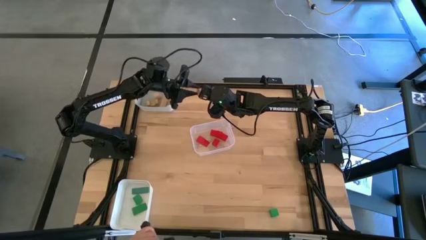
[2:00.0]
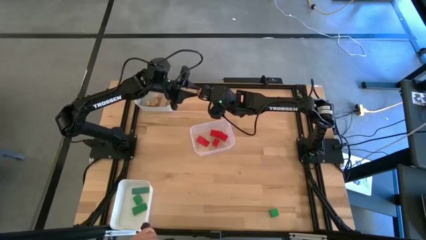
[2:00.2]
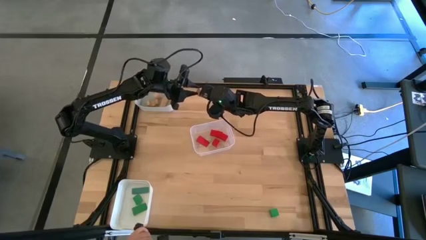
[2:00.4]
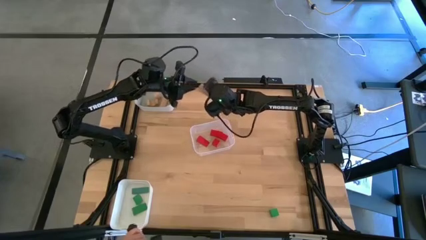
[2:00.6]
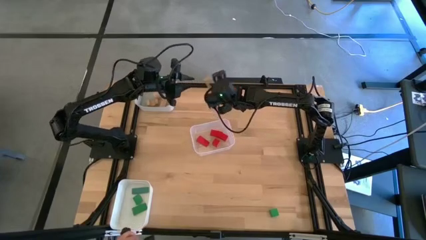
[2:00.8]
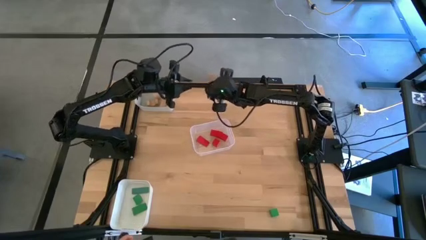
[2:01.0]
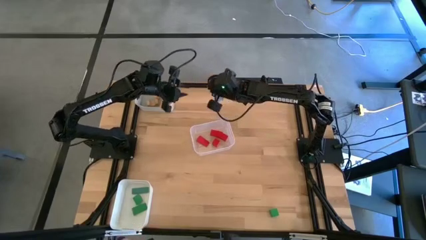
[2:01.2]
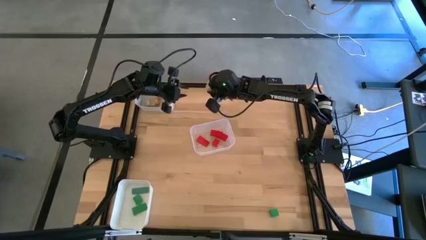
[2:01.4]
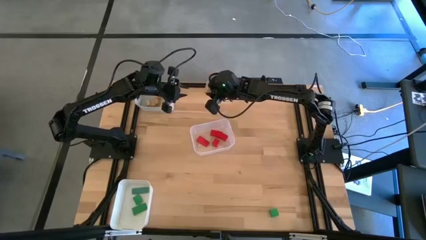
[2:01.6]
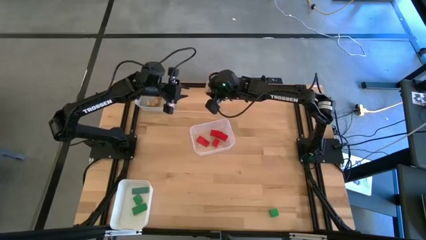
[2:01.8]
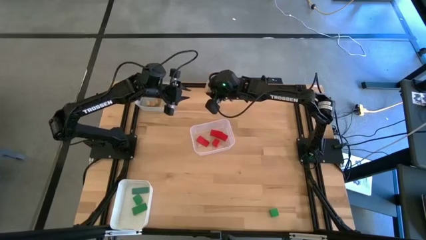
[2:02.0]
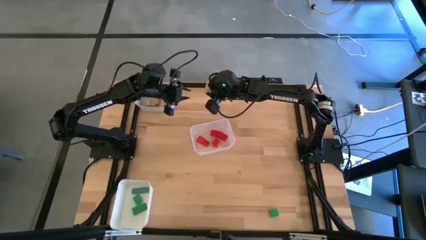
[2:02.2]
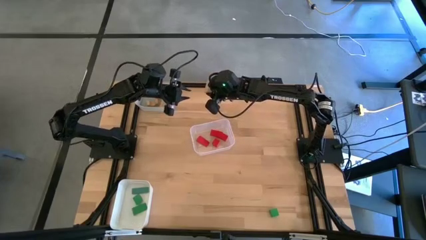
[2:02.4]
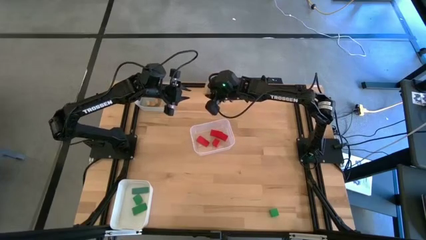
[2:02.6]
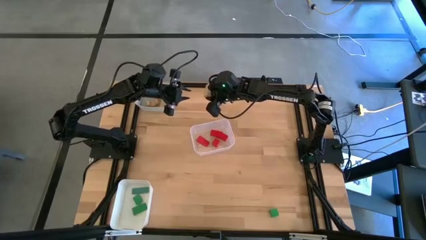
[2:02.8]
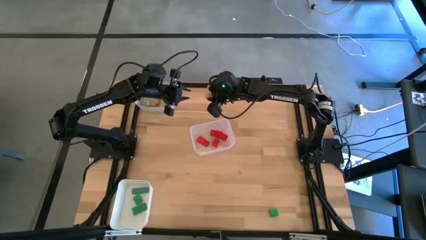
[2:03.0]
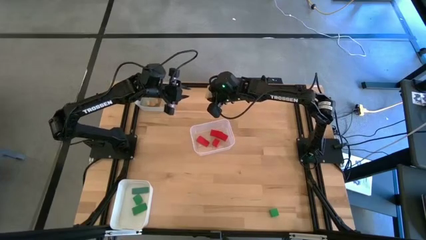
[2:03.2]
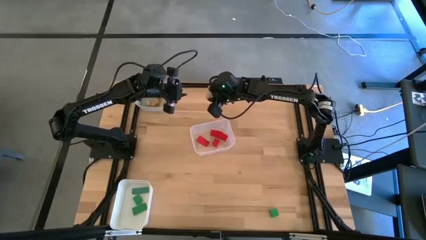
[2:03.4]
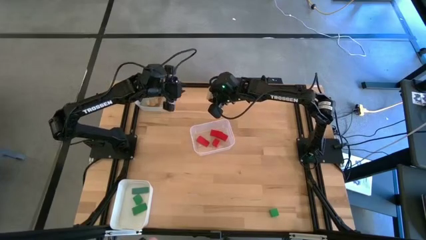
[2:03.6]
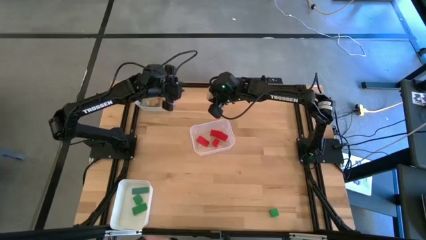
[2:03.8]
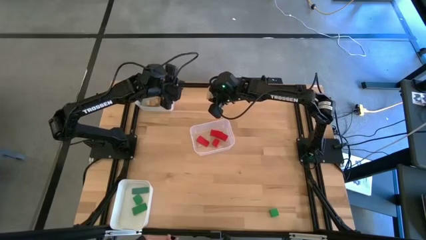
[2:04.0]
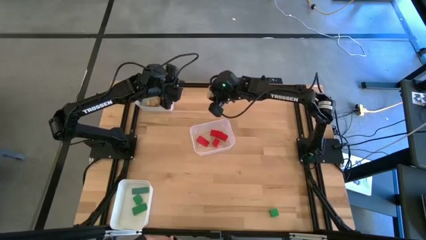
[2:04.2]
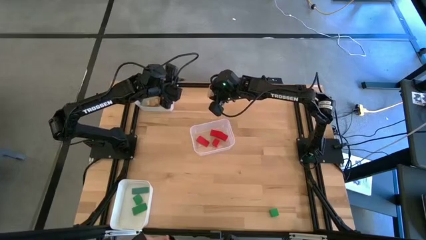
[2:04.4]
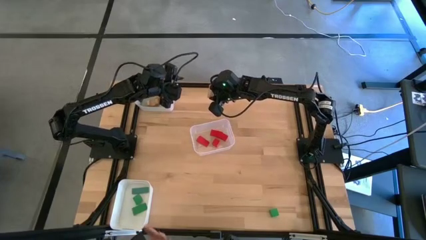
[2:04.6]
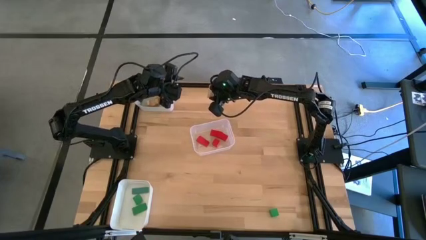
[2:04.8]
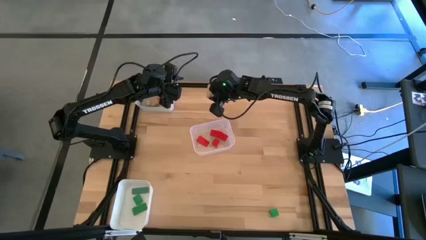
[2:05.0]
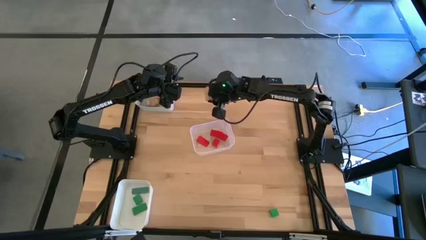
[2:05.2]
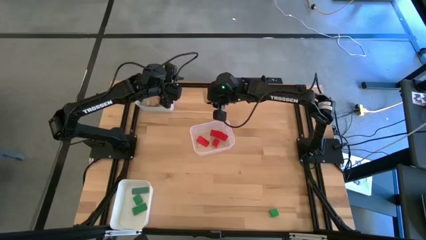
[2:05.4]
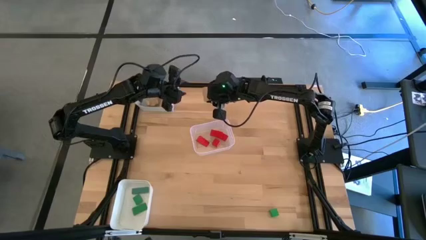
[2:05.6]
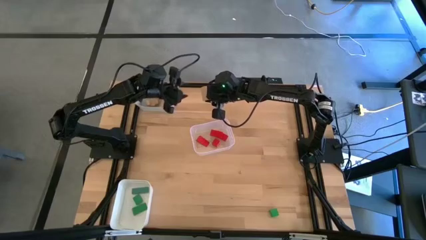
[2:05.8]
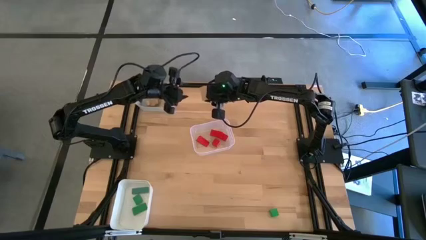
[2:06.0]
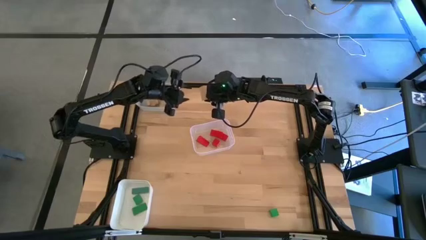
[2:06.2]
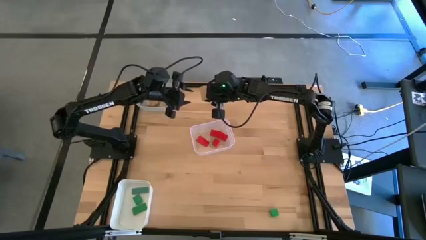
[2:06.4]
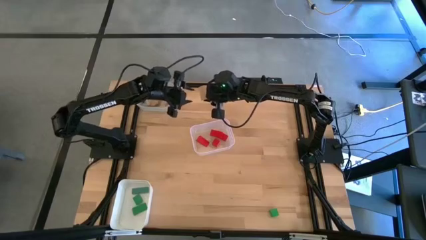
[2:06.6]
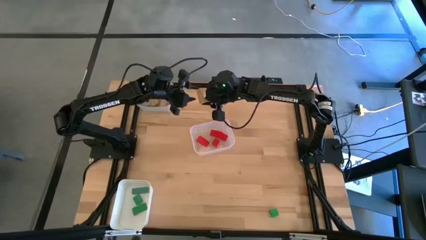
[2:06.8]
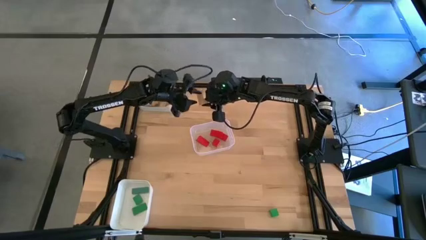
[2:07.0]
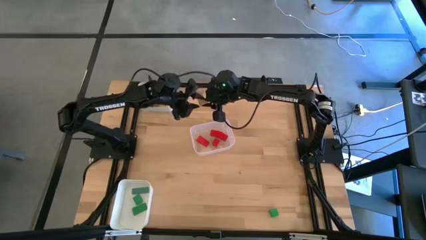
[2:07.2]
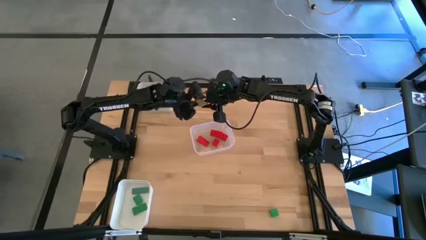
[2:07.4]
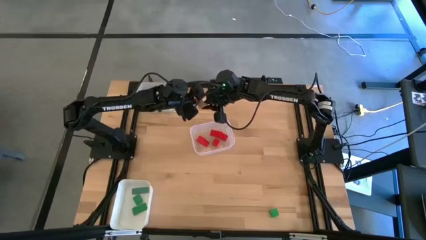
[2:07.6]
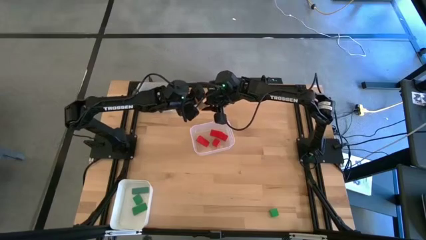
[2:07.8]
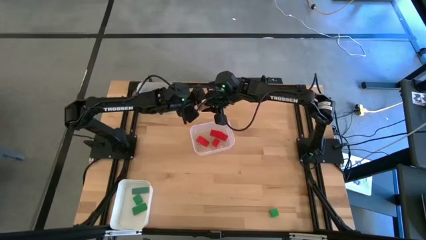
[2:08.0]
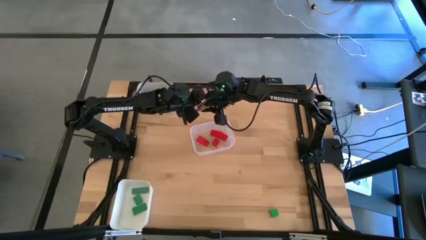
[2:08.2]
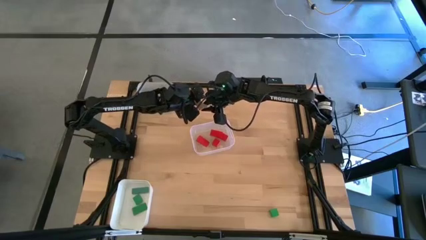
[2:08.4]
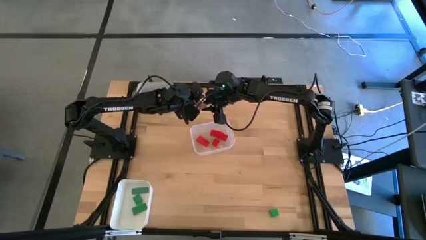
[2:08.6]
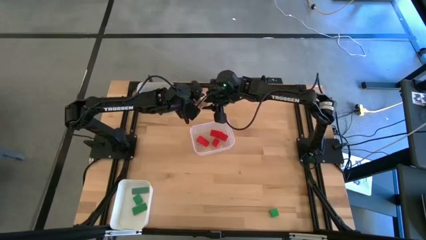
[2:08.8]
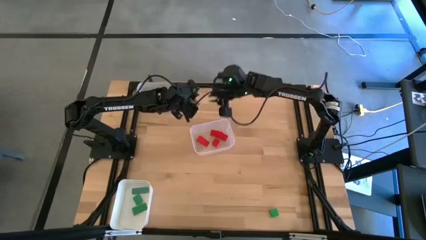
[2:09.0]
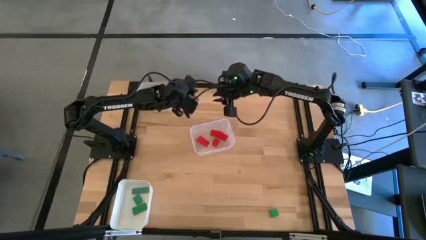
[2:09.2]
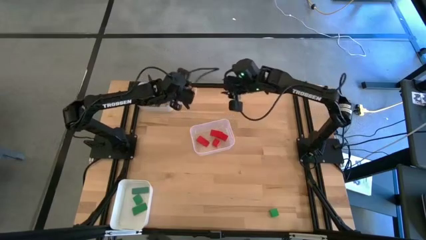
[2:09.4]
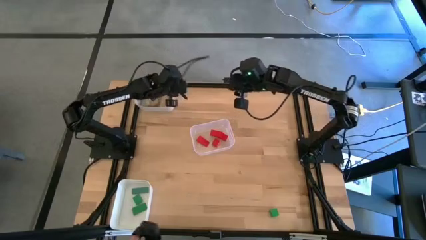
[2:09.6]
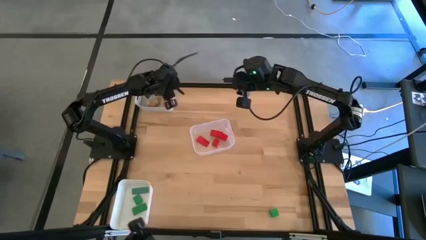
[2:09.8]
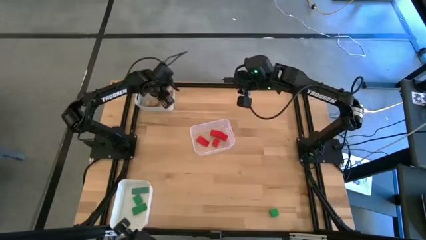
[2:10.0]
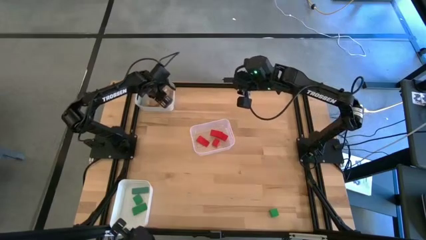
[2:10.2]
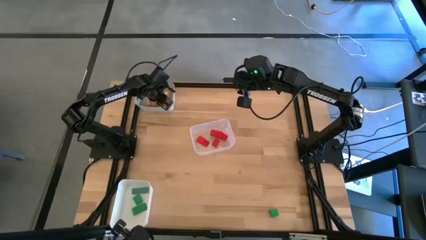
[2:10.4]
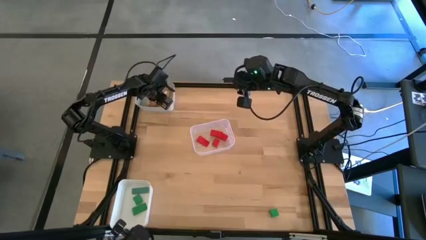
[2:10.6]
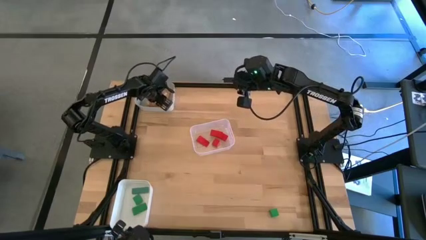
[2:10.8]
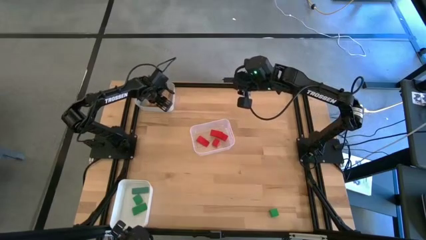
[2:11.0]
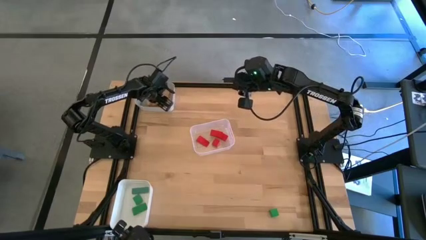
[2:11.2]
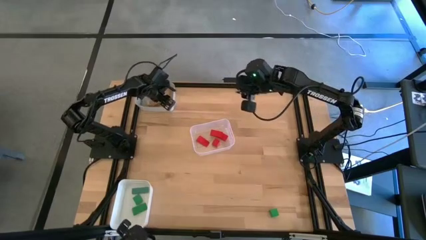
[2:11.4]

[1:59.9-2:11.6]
Task: Sort & place blocks by color
Put the brown block into the gray bin
